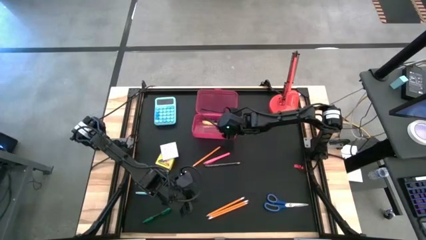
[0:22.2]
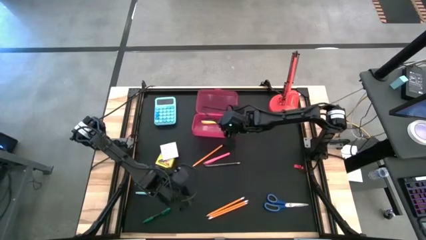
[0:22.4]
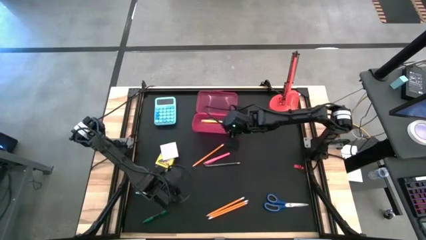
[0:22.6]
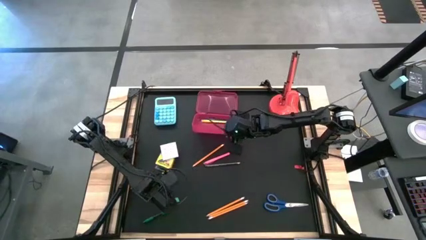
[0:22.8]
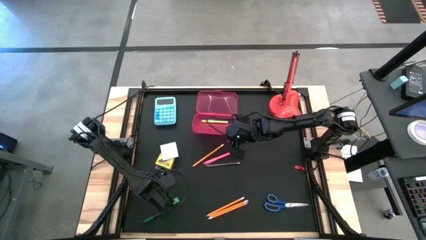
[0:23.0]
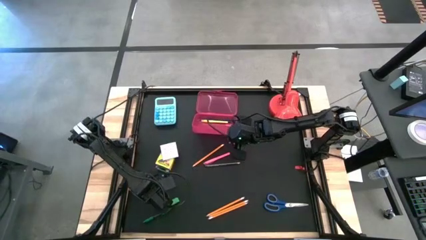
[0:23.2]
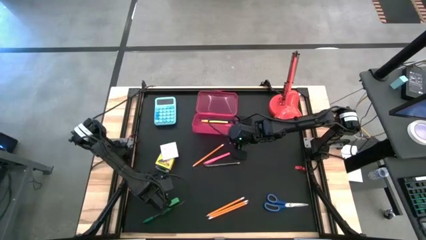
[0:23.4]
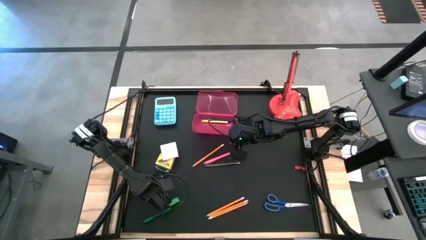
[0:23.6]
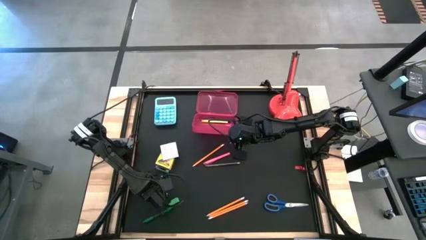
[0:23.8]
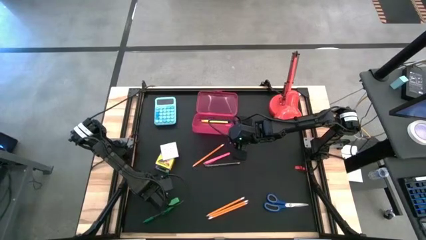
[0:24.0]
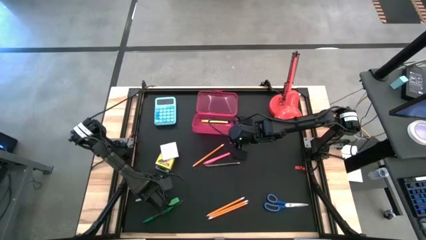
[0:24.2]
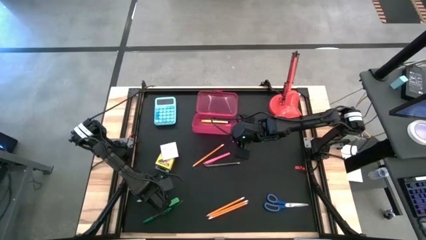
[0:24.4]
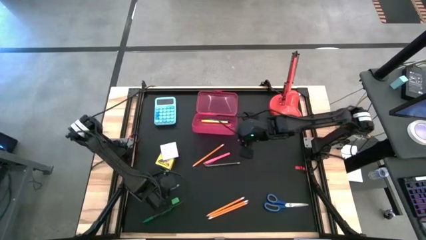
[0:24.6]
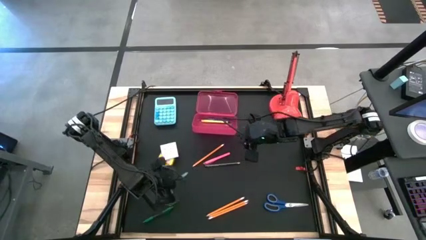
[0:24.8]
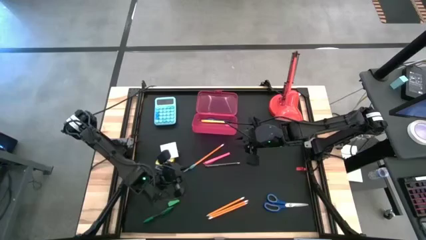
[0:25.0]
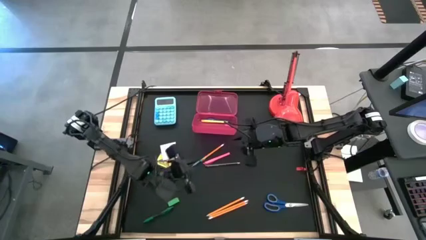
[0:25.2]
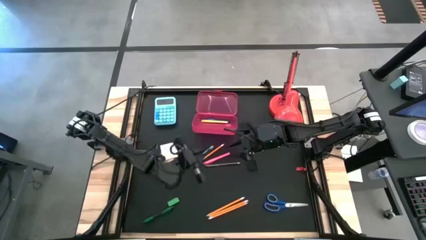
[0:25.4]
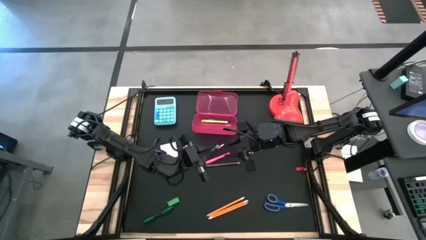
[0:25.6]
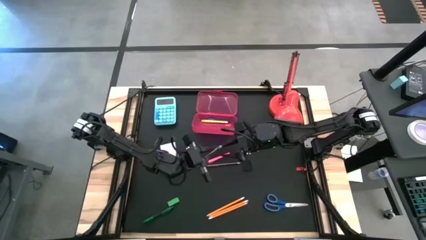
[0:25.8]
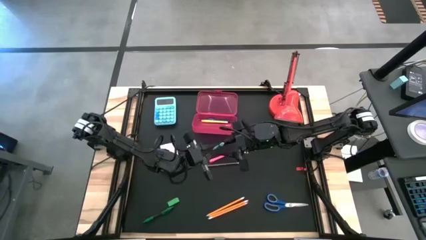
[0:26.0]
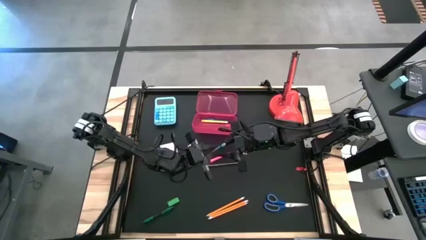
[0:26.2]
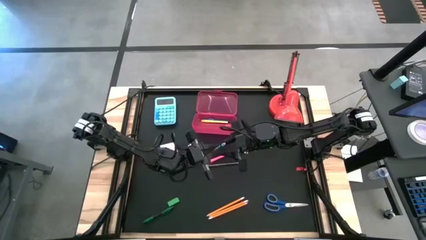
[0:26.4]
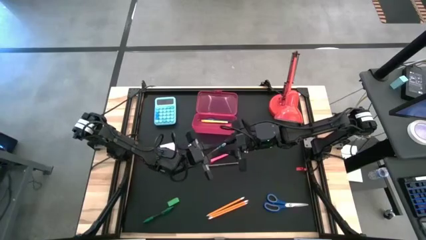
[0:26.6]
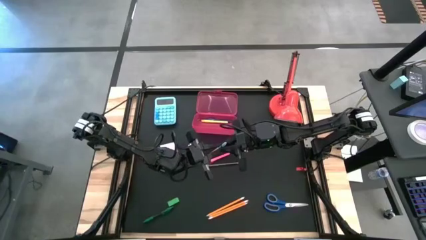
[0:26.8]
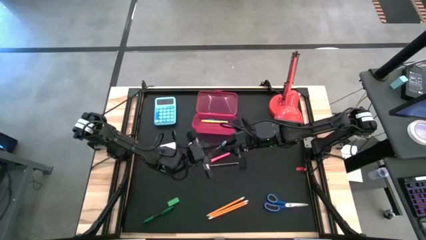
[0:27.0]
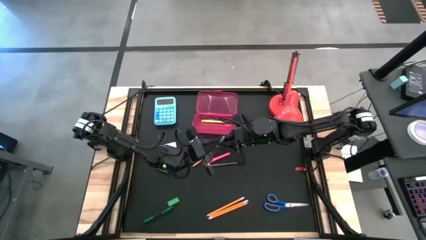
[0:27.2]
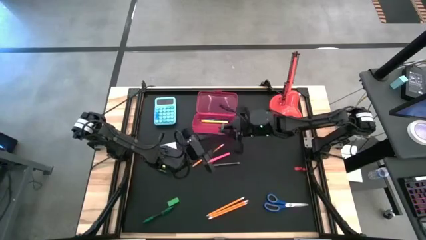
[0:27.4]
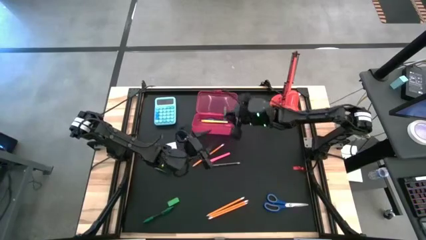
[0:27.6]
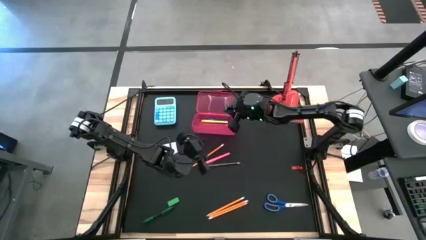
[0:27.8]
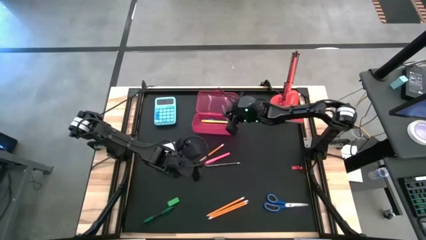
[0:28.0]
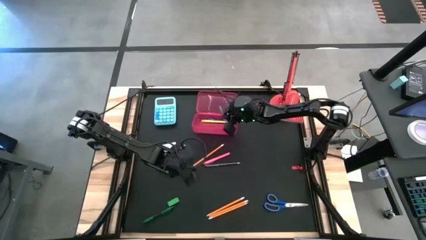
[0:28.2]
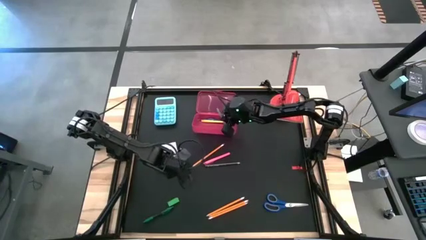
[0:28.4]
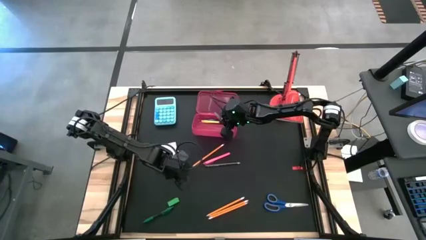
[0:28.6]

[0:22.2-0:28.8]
Task: Pack school essentials
Put the light blue pen into the pink supply box

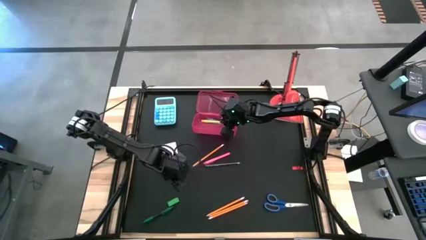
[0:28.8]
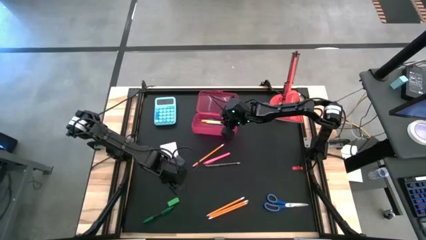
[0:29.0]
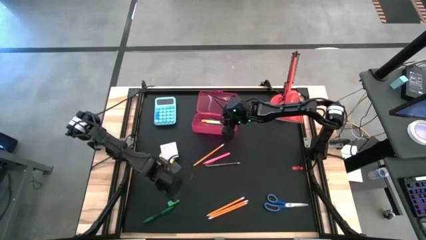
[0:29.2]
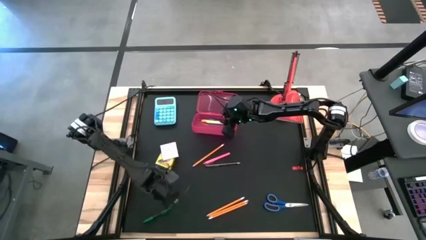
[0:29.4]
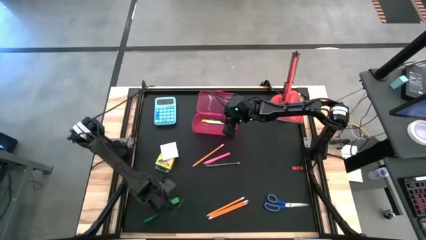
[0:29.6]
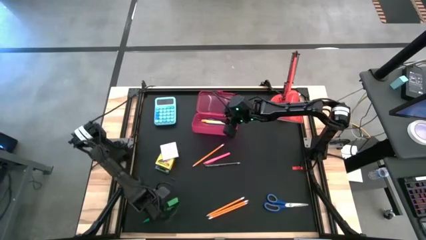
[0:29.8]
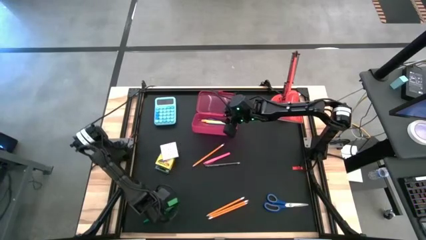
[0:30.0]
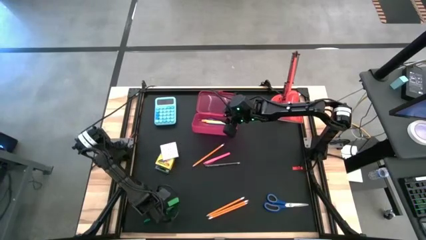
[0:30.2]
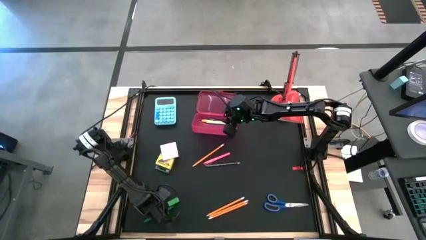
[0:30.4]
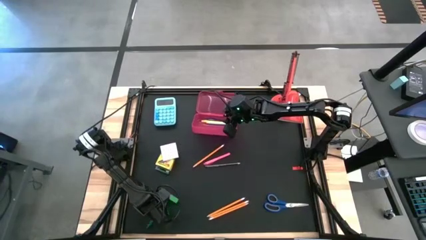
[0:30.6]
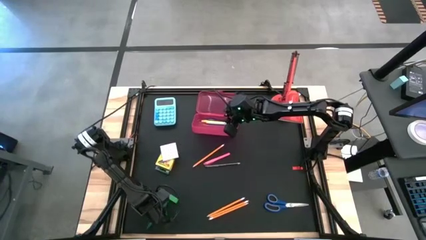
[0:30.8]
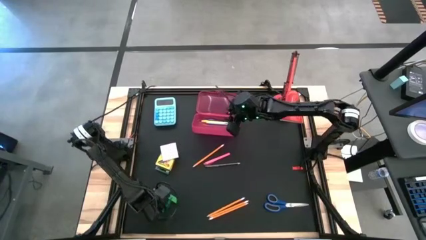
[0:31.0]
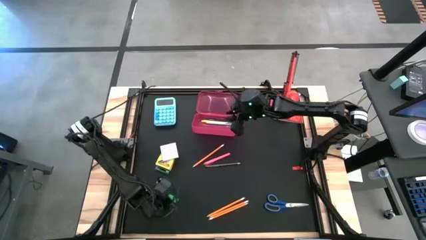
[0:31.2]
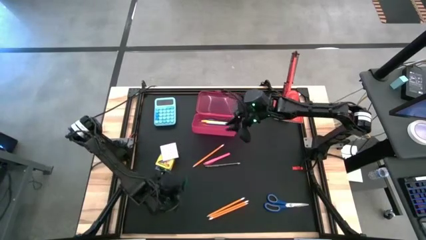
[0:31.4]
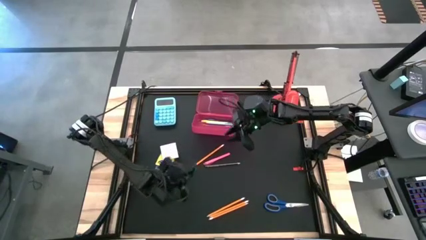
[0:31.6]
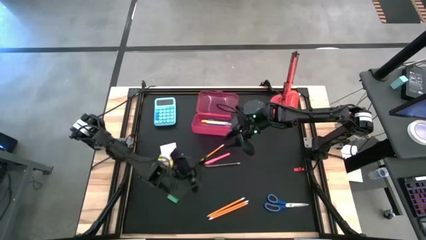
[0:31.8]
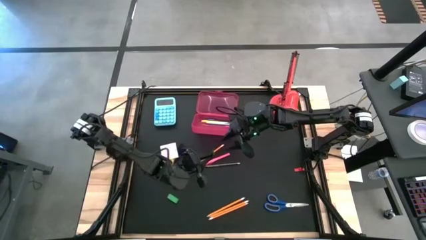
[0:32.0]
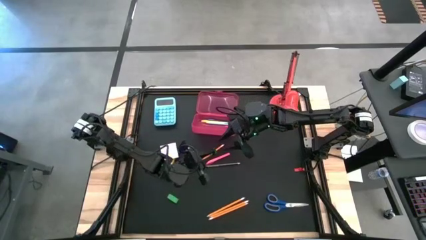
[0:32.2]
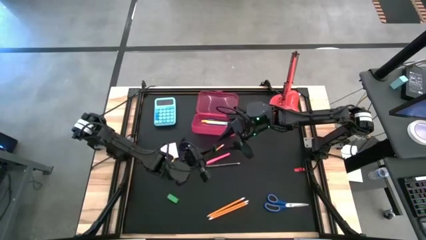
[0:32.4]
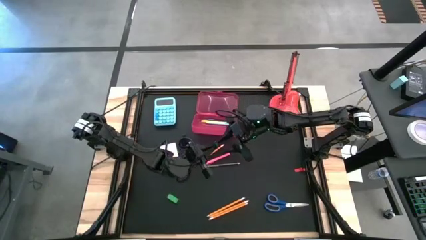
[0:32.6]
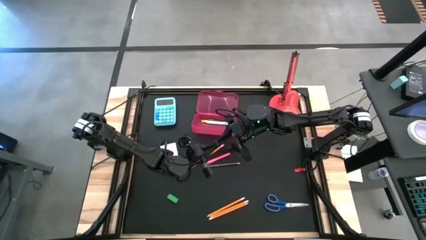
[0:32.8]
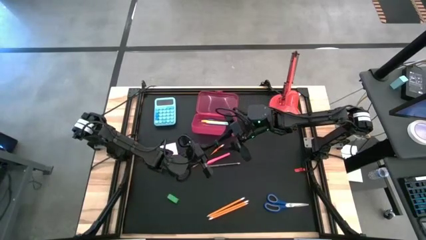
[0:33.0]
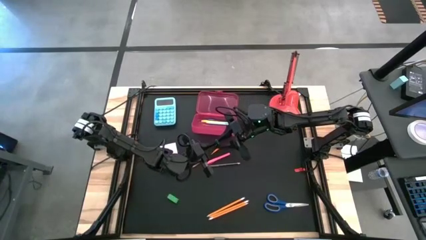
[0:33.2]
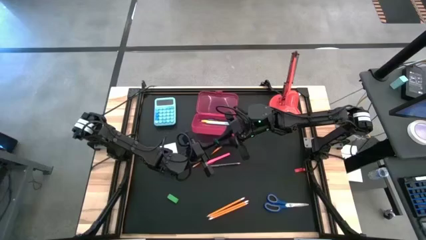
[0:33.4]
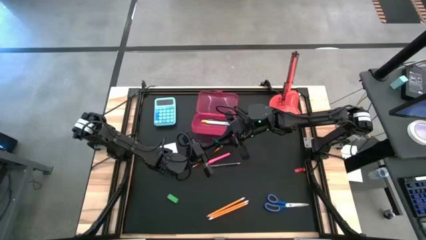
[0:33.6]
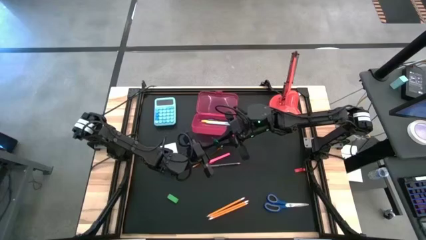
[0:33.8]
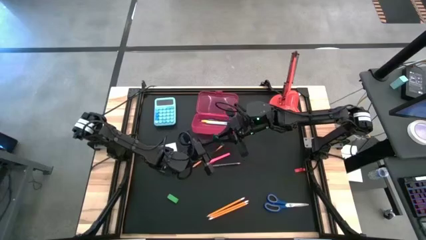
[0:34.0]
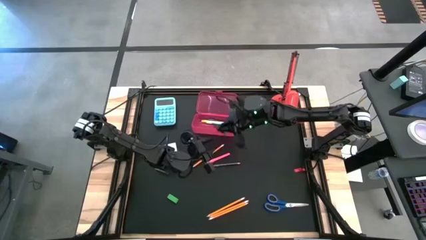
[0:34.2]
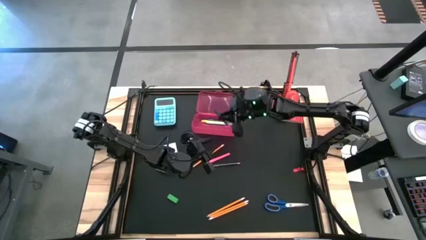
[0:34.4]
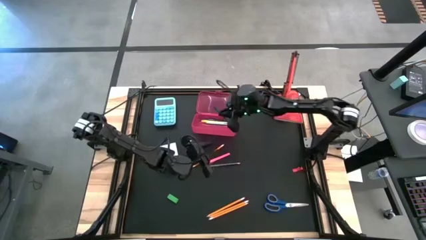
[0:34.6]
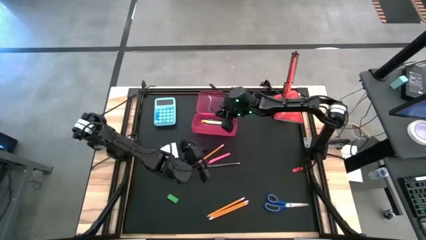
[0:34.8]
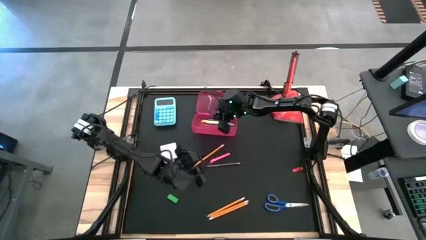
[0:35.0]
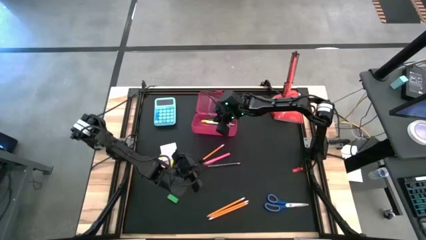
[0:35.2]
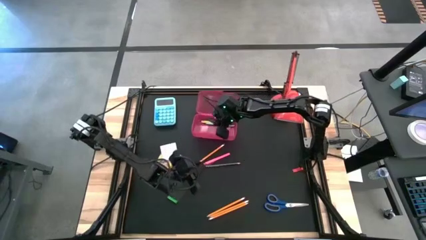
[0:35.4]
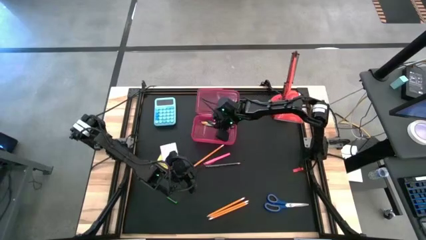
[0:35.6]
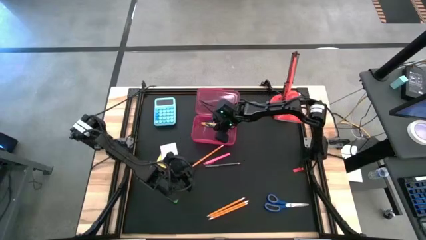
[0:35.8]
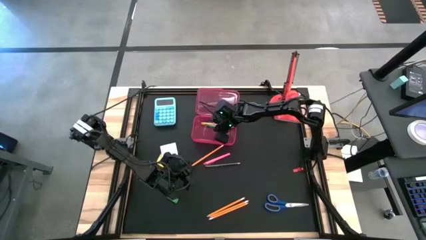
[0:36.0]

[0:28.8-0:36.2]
Put the green pen into the pink supply box
